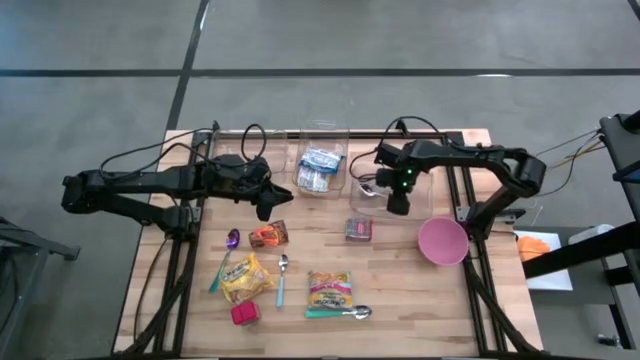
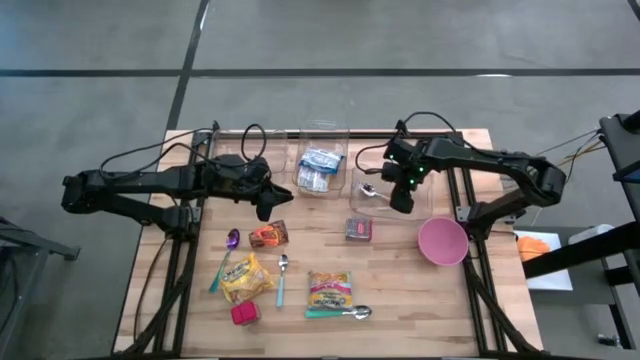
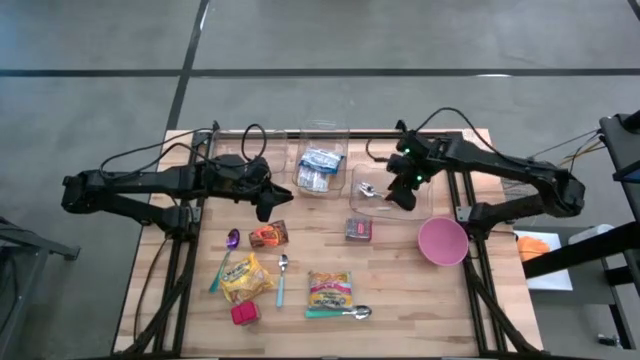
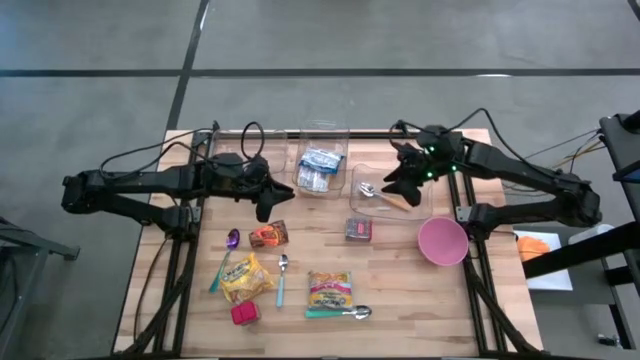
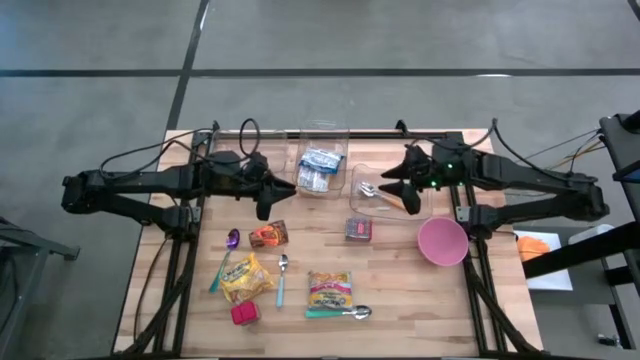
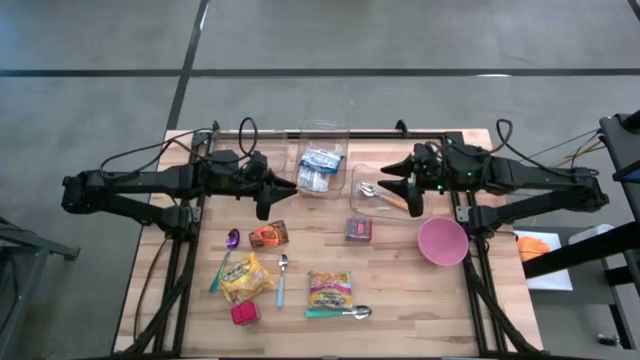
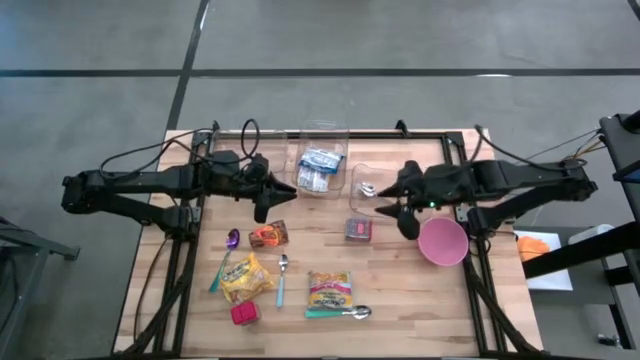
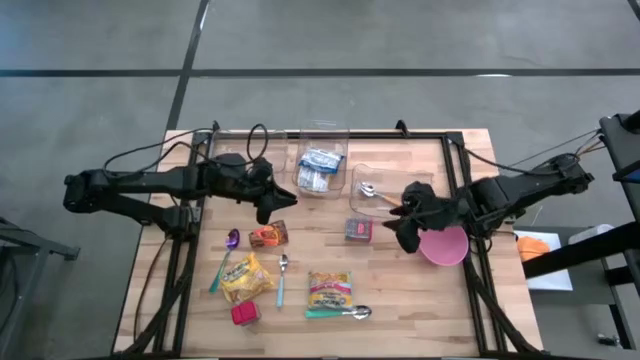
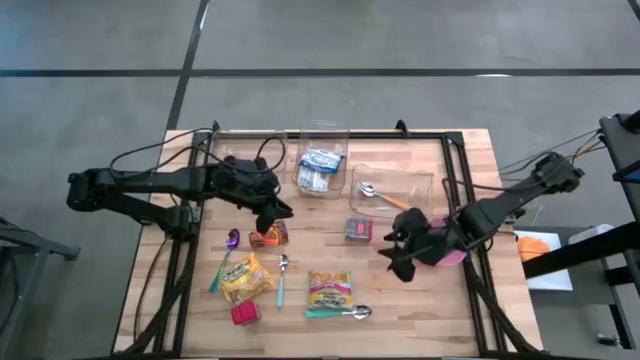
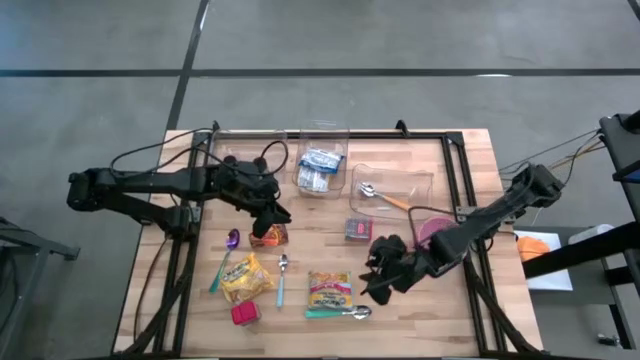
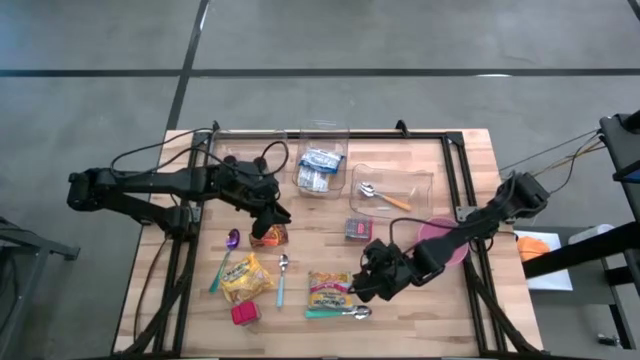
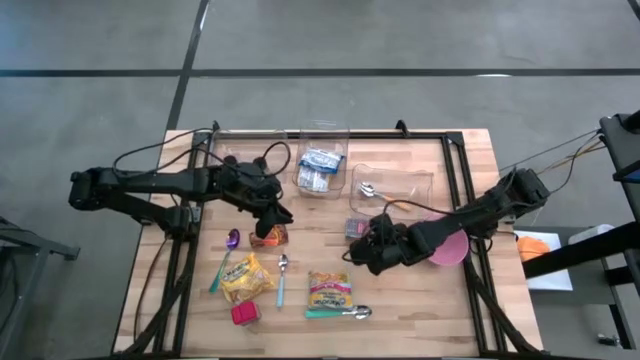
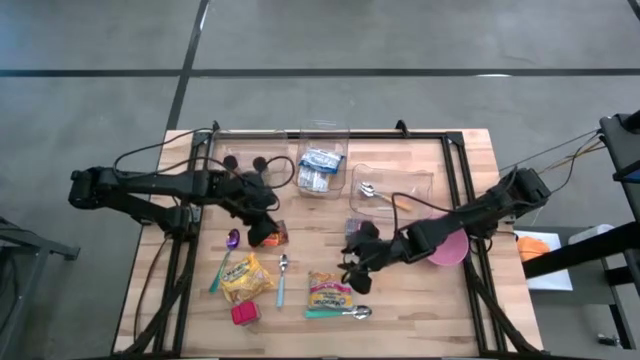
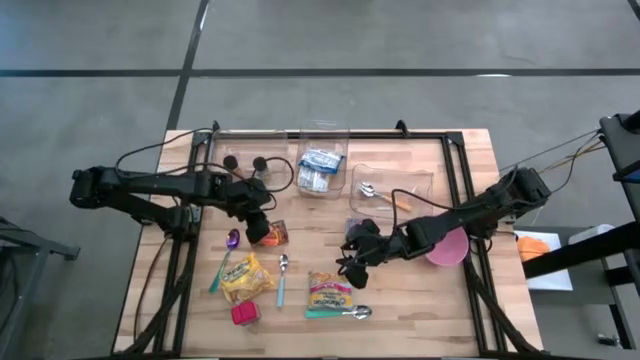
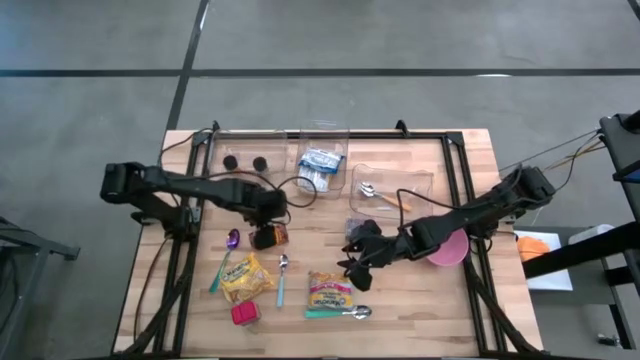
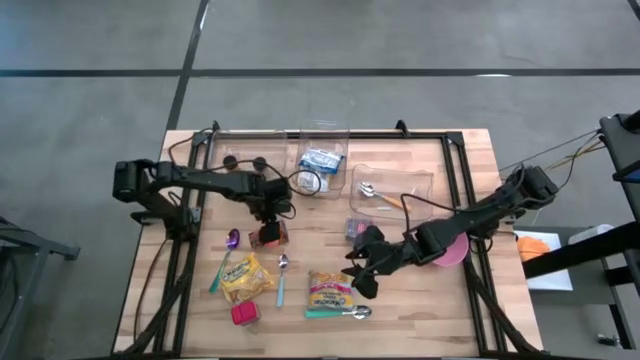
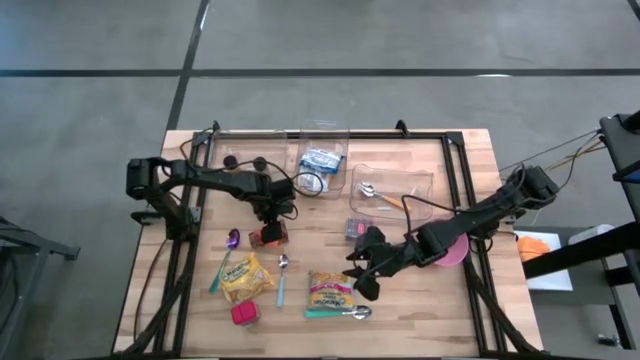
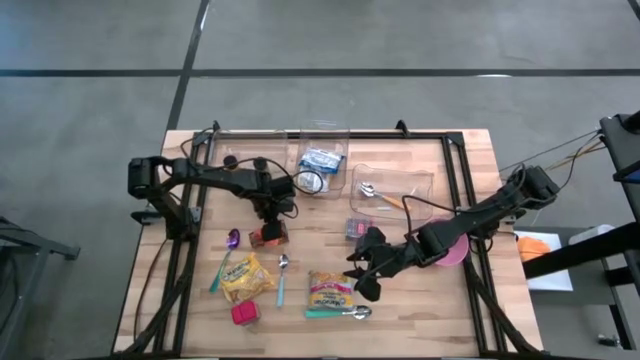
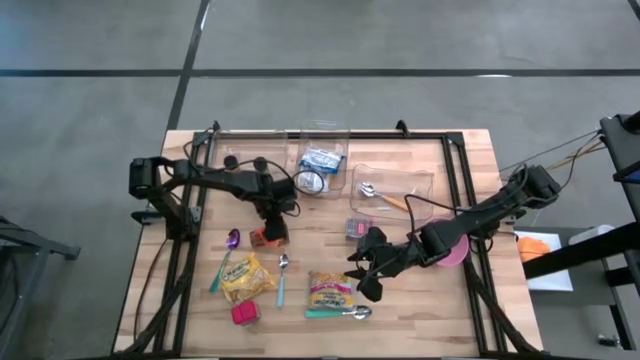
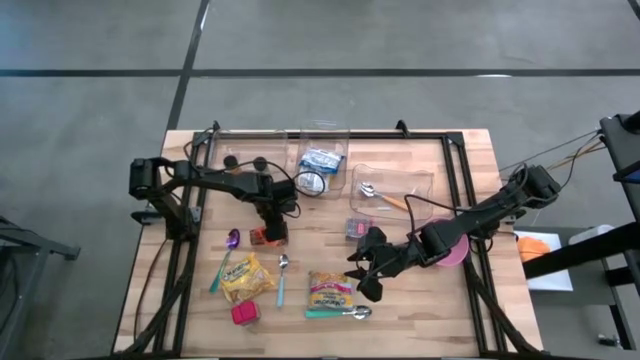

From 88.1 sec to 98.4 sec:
Put the orange seasoning pack into the left transparent bin

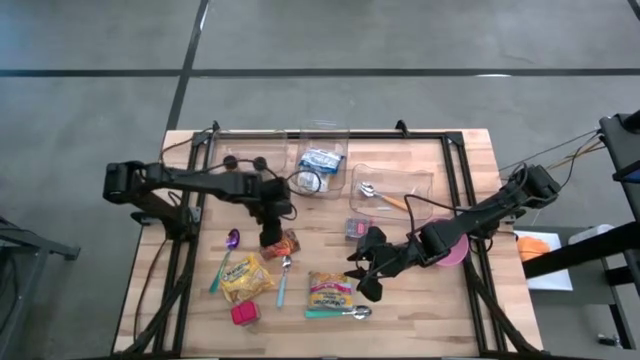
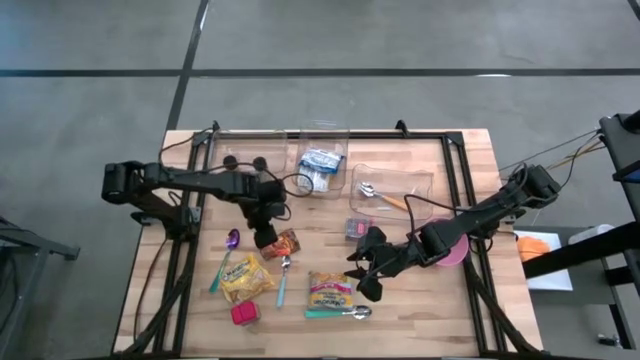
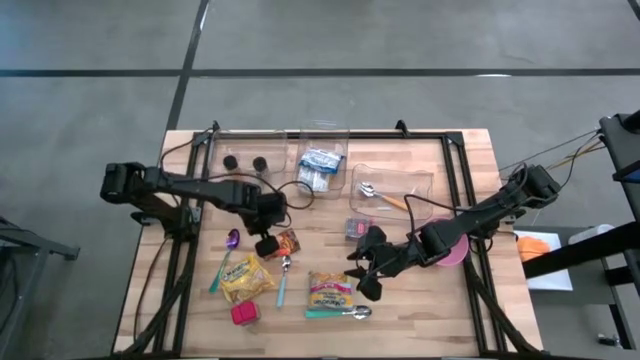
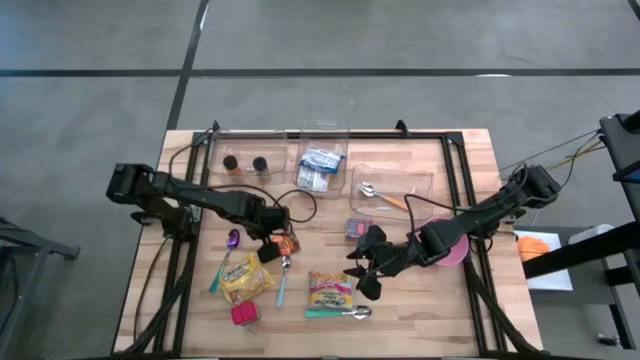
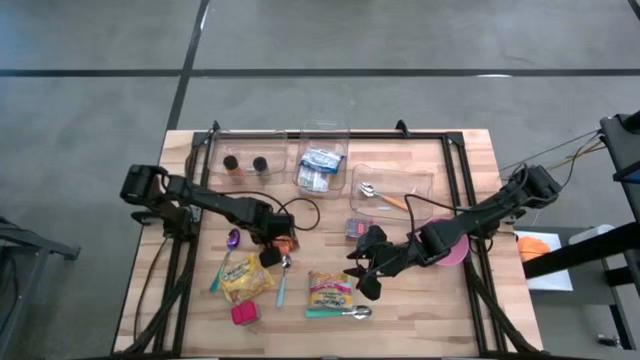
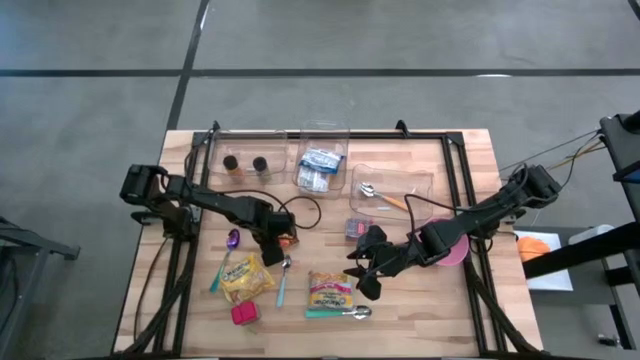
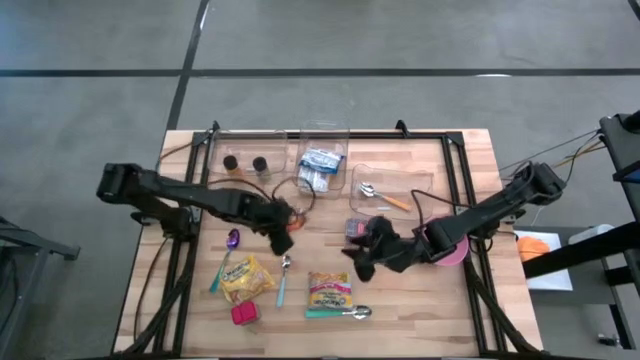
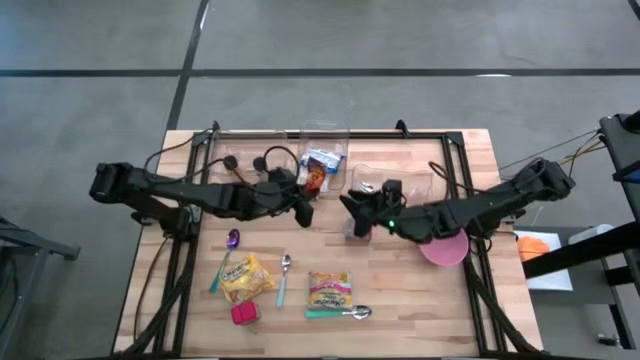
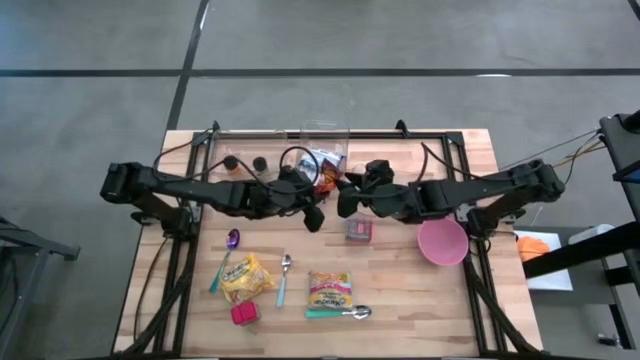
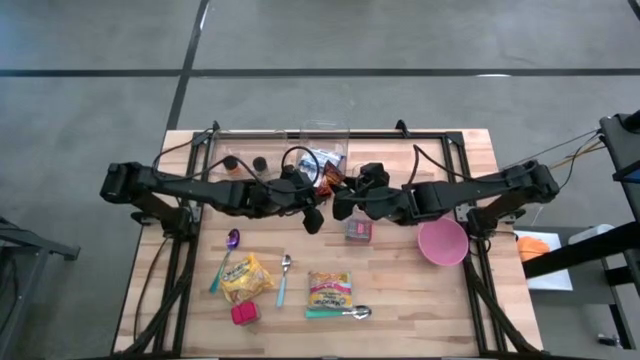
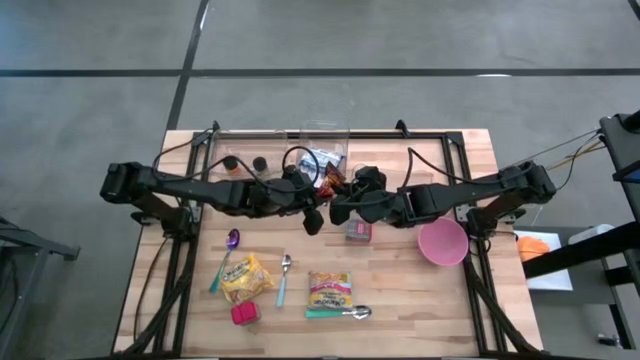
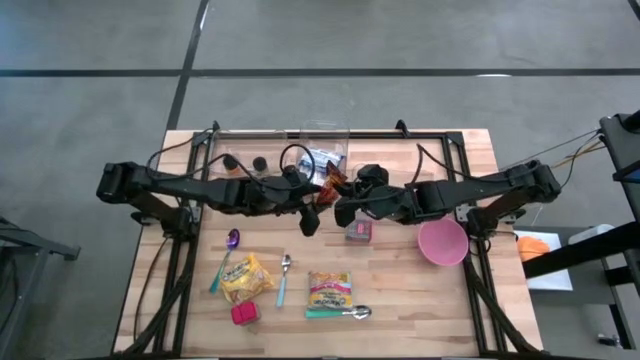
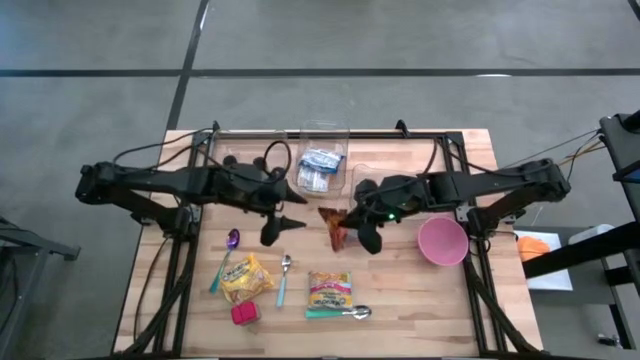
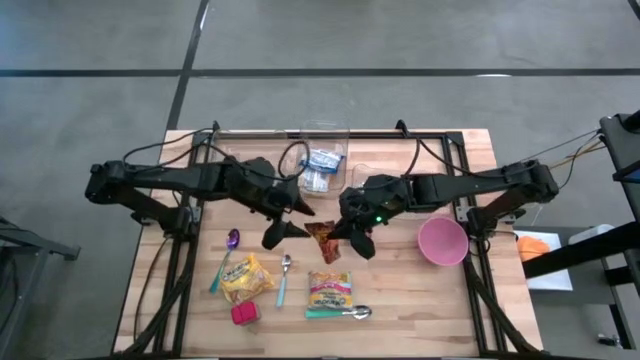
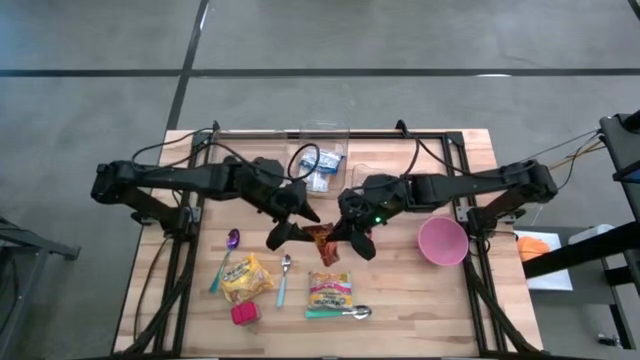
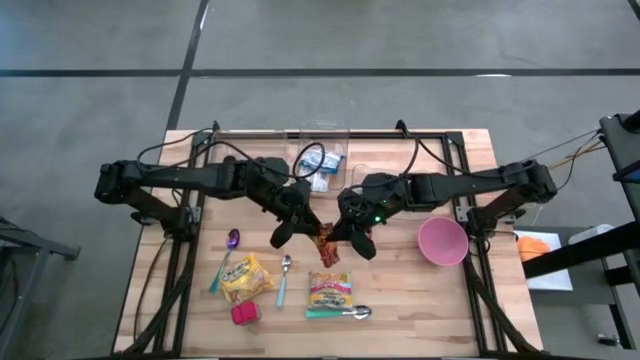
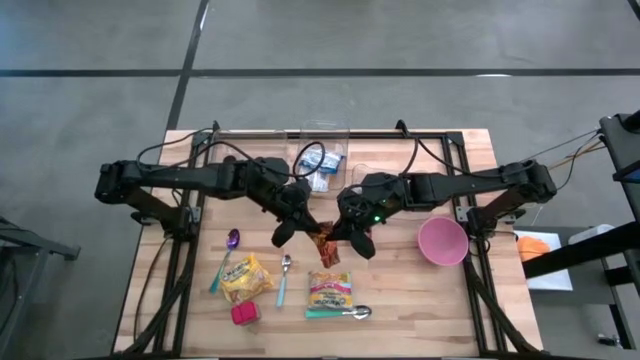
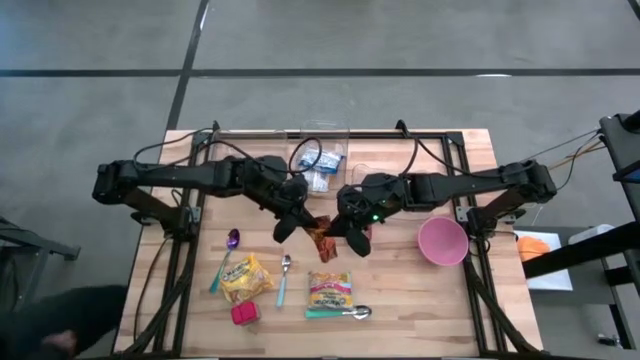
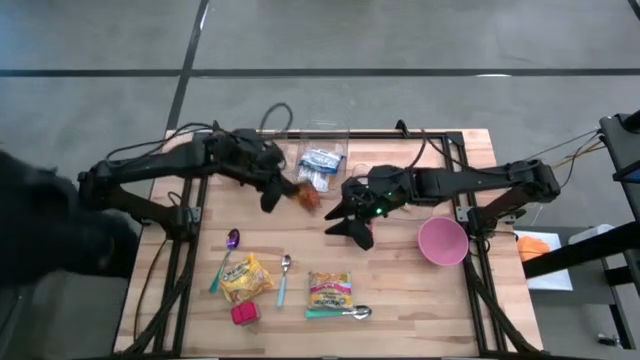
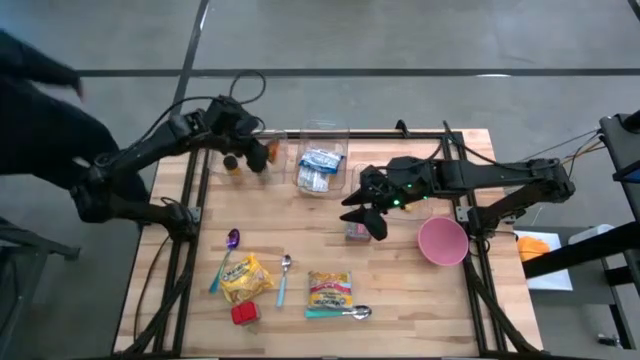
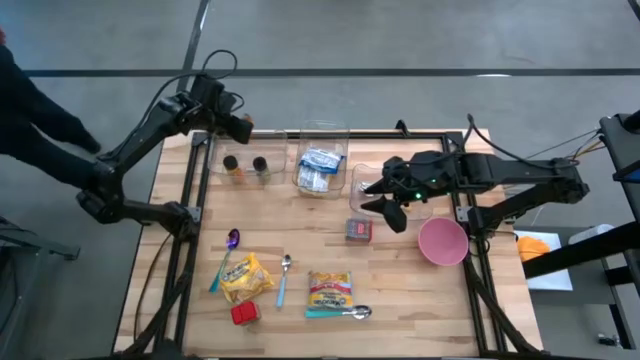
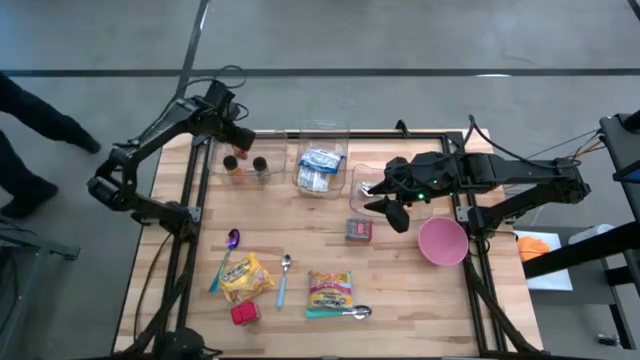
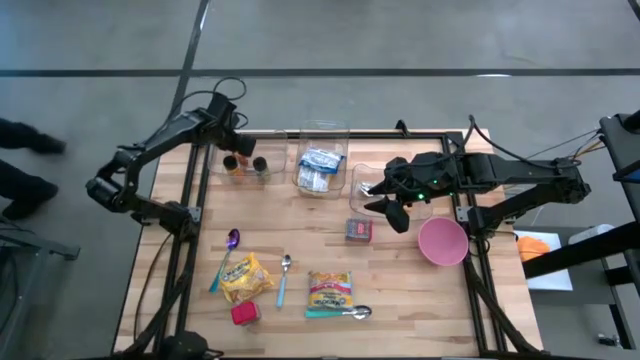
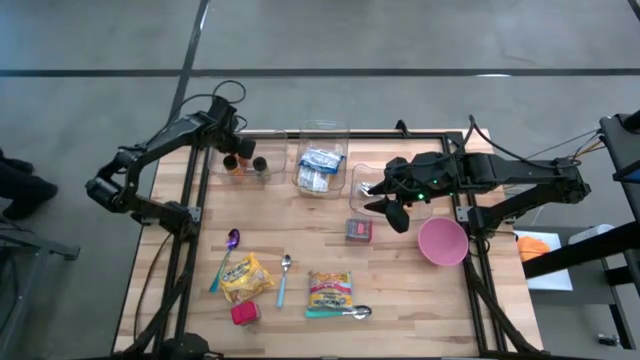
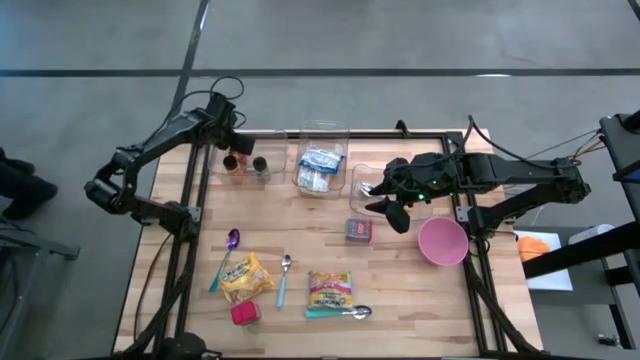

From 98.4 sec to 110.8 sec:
Put the orange seasoning pack into the left transparent bin
